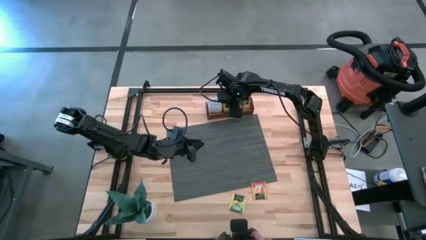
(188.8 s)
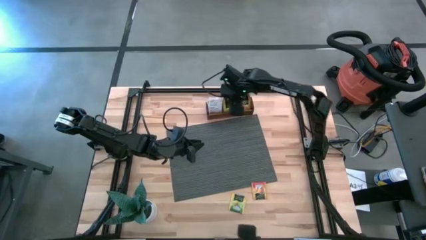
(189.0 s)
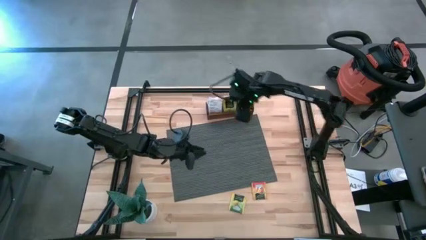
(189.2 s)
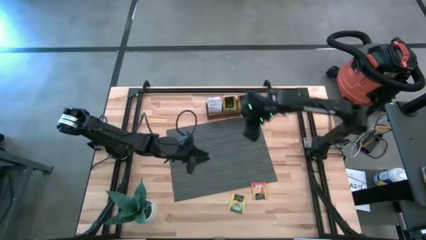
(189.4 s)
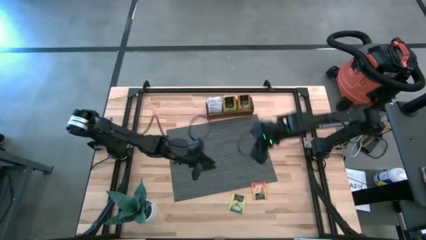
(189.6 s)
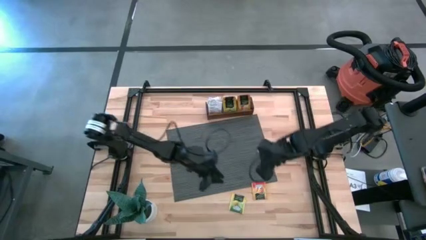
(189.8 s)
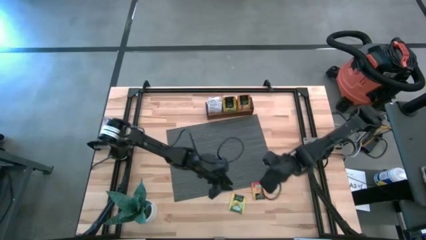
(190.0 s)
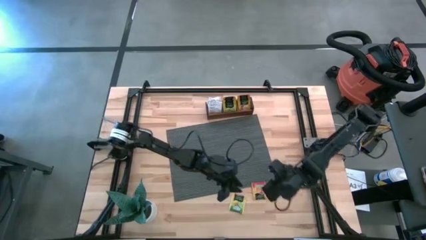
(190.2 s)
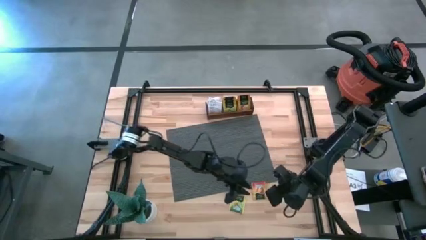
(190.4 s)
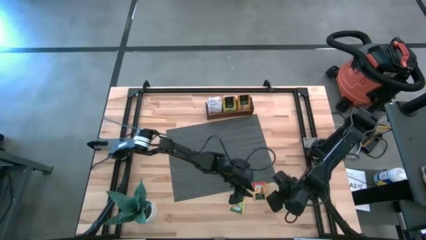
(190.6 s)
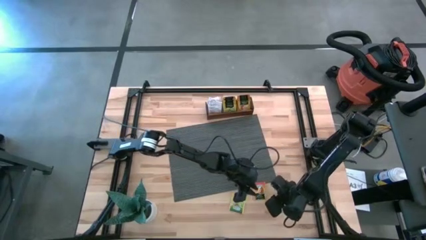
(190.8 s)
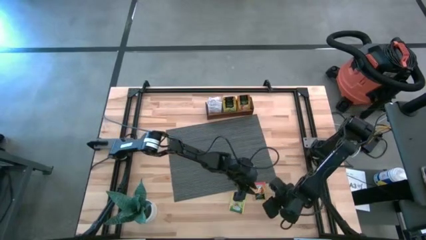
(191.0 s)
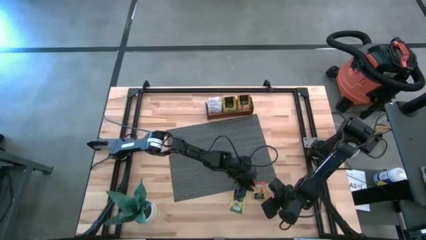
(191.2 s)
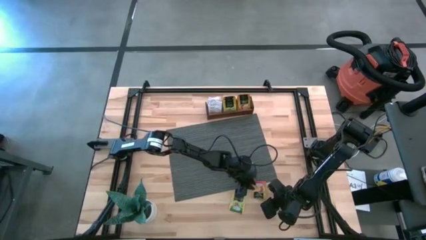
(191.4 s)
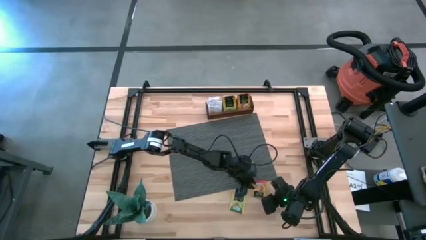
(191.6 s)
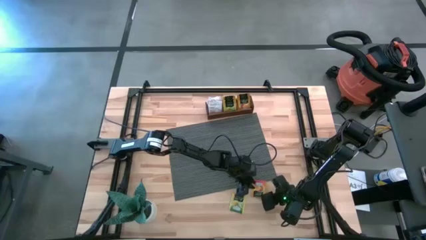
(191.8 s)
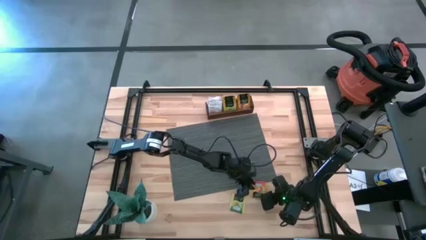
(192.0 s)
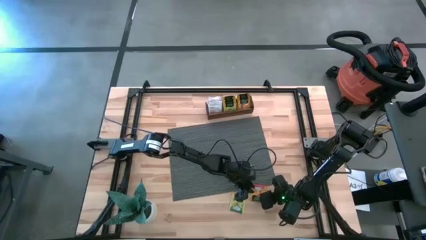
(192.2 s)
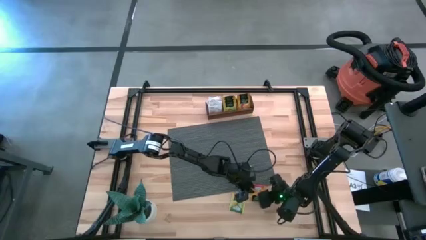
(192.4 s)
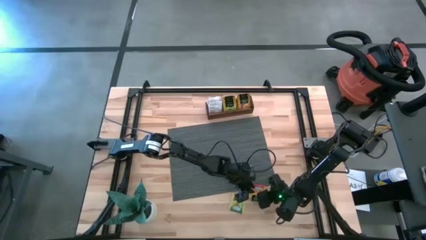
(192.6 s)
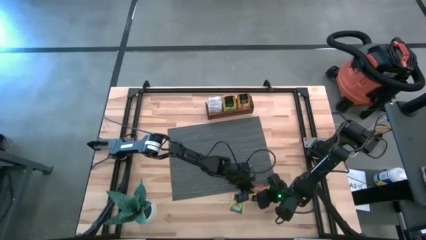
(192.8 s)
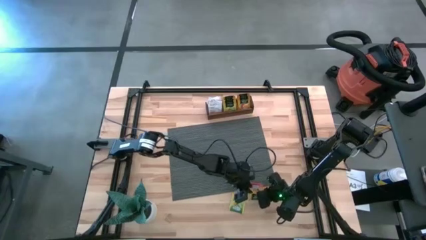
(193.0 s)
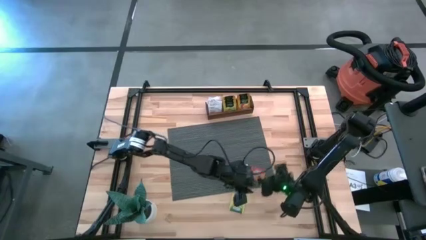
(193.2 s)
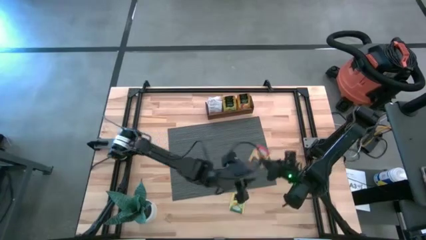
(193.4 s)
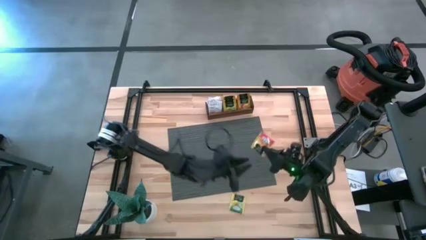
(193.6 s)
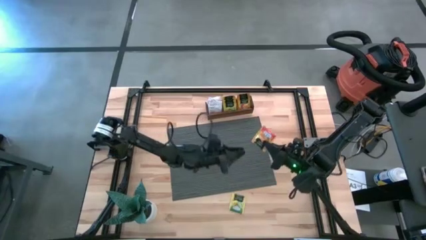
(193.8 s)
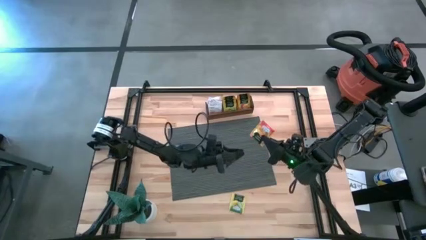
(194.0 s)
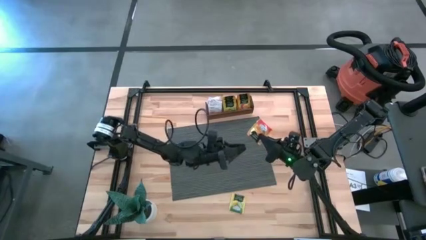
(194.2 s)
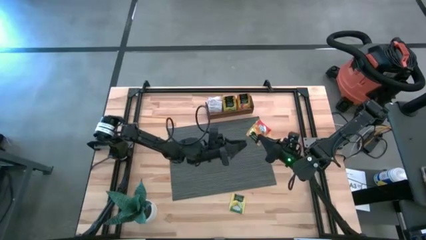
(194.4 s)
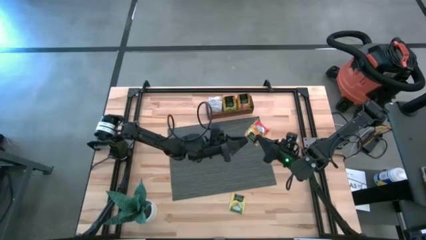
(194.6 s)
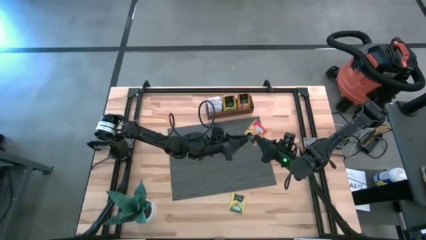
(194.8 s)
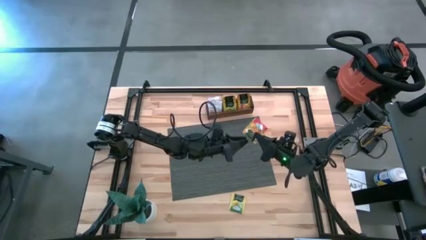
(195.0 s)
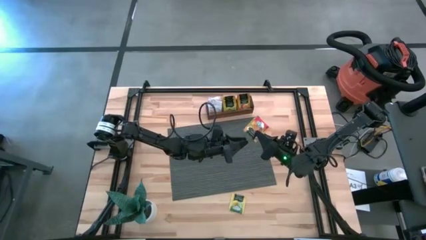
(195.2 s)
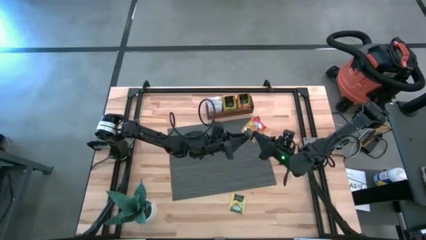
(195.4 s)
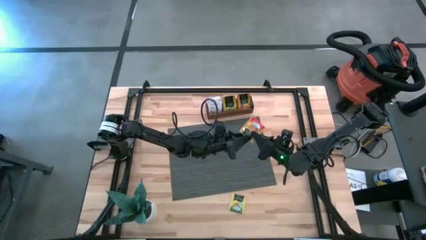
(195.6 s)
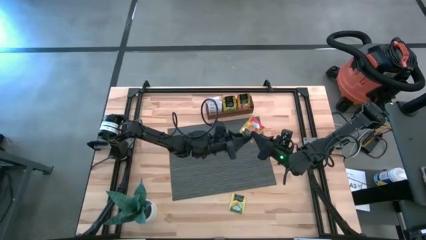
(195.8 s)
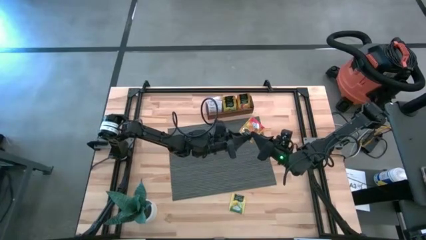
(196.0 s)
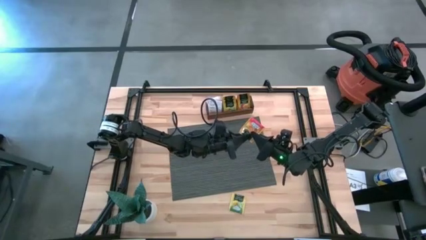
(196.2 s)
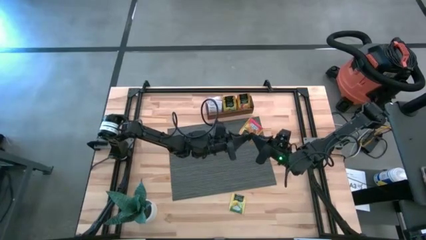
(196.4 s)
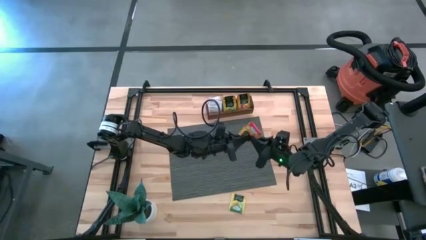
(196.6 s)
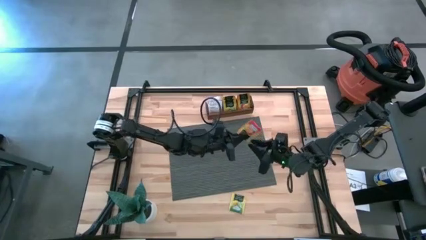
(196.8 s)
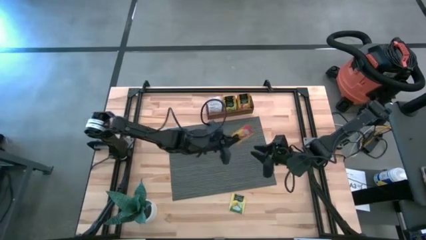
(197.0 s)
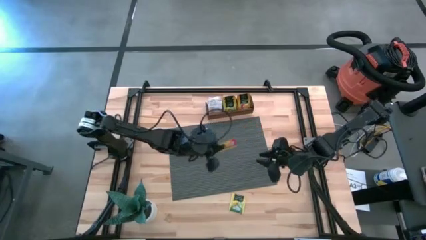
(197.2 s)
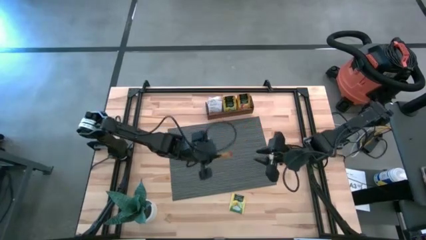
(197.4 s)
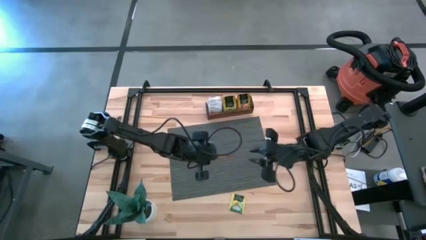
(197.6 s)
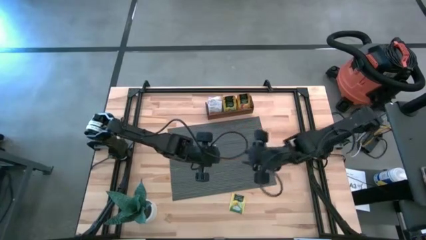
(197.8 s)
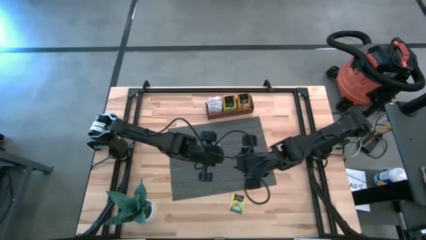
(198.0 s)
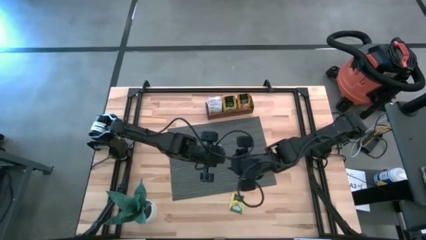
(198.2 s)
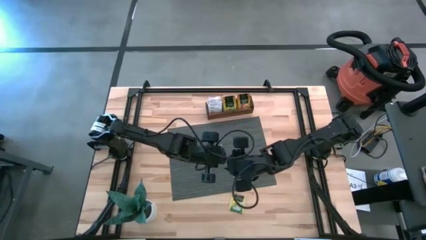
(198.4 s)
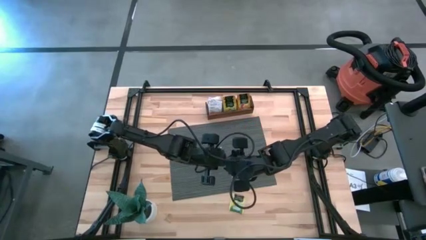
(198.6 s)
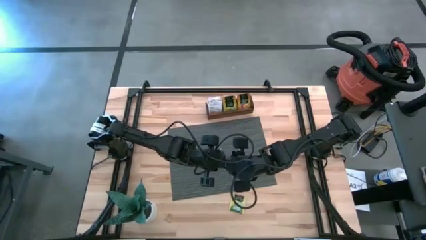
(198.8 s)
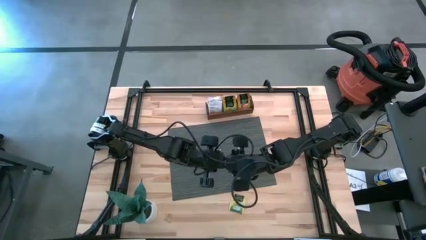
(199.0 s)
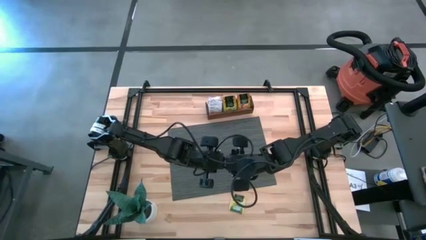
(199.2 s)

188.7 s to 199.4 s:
Task: Pick & Place Tea
Put the orange tea bag into the right section of the wooden organizer

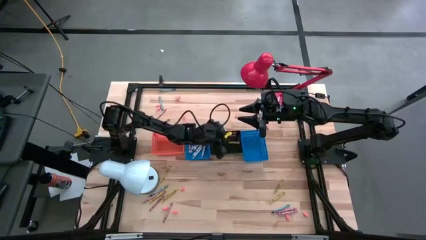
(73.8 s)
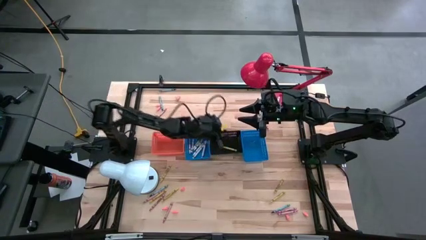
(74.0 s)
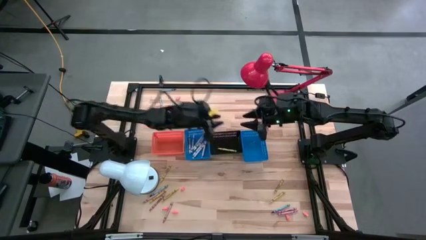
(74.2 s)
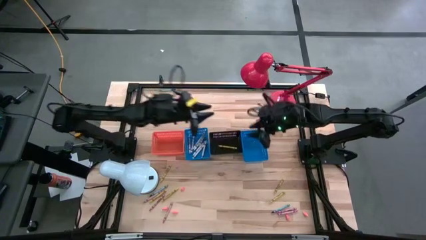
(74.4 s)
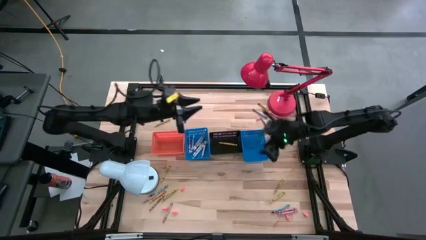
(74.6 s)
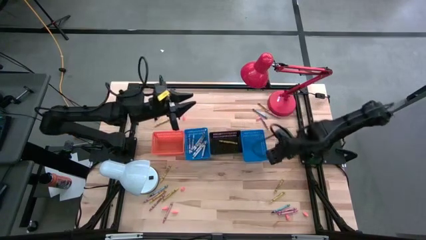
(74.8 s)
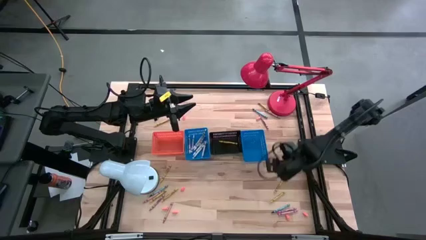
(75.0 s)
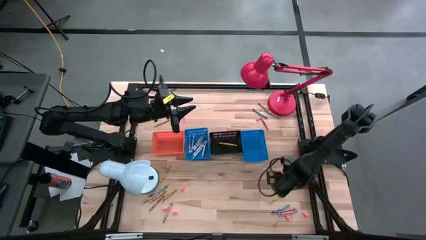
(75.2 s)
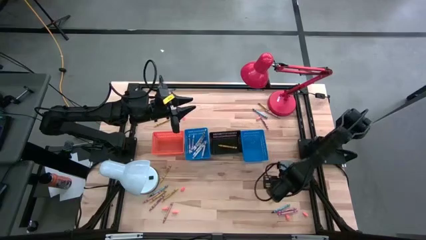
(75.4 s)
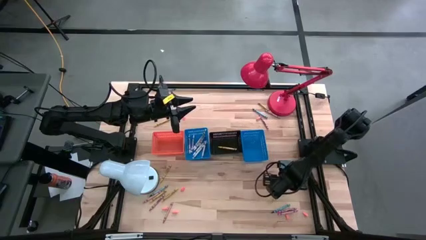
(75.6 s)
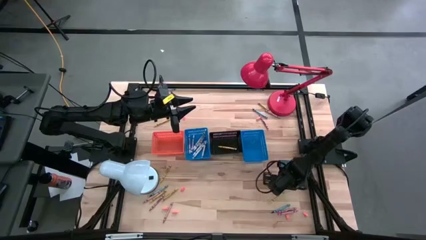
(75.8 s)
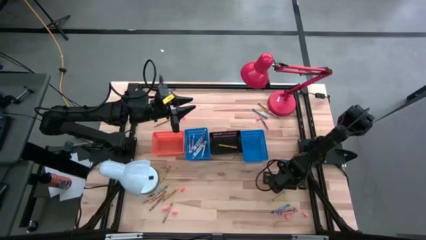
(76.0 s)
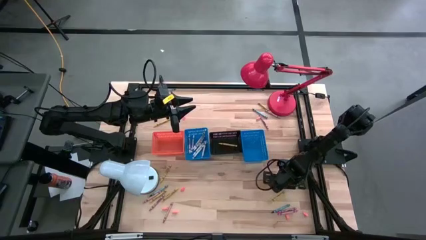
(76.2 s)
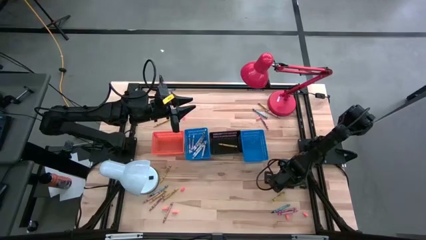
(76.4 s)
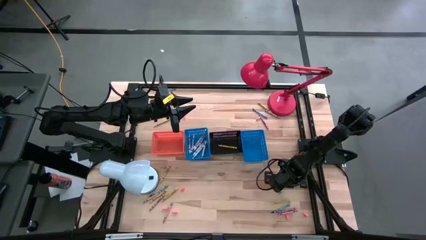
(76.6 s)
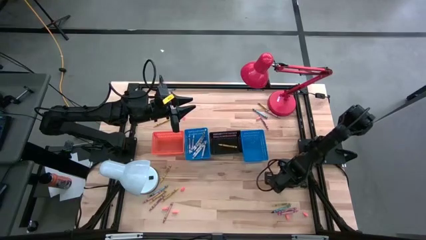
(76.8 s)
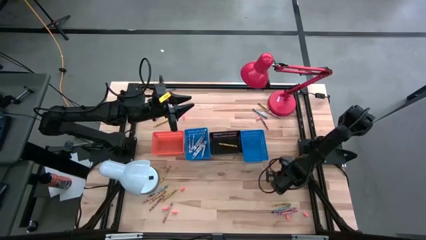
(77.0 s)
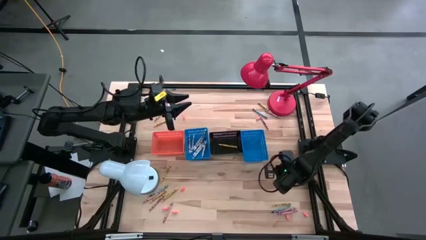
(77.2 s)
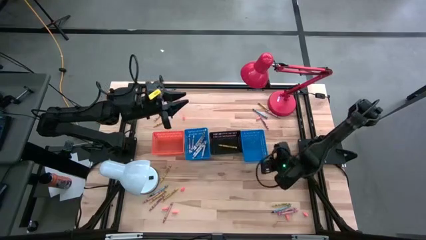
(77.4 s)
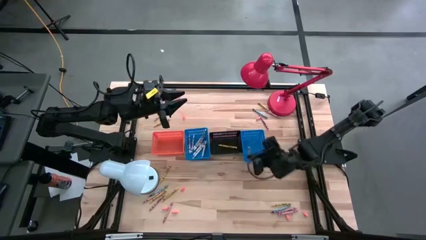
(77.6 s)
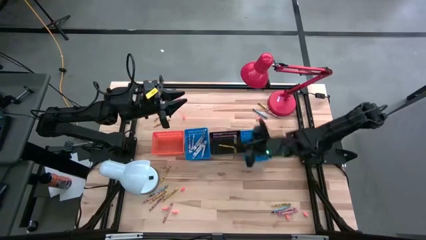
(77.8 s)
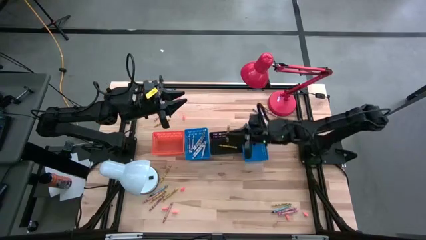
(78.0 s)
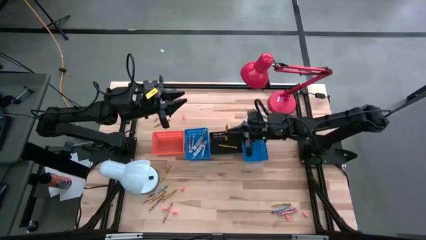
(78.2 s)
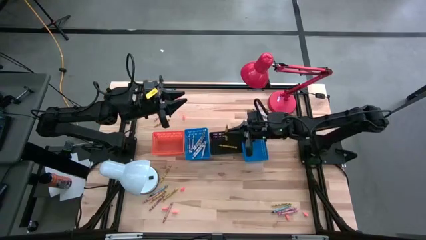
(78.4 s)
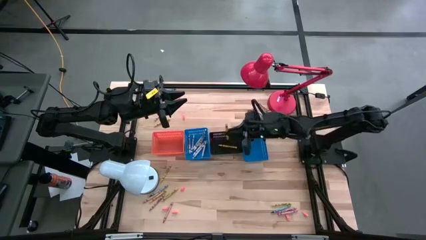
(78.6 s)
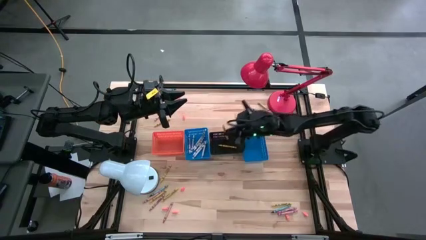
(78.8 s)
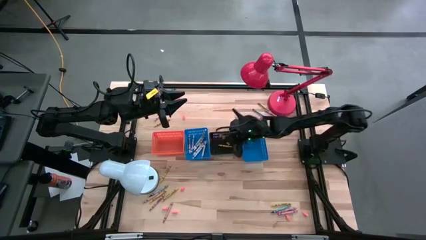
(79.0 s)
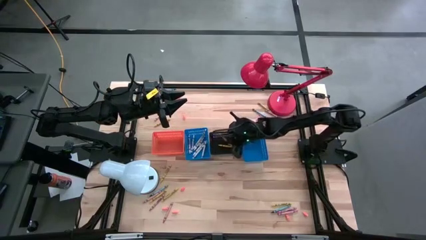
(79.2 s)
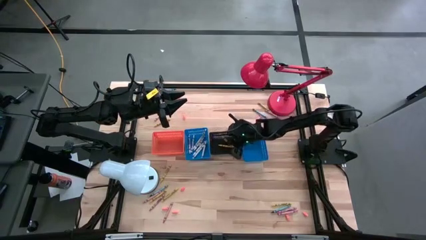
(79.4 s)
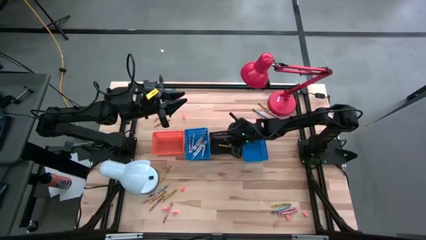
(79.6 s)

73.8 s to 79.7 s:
Task: Sort crayons
Put the yellow crayon into the black bin
